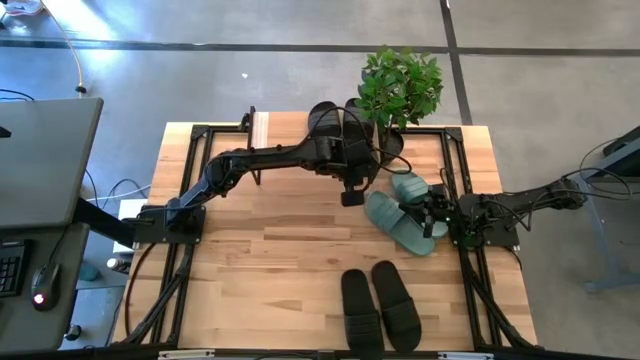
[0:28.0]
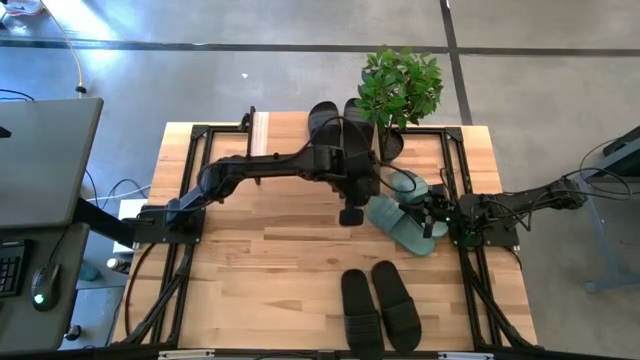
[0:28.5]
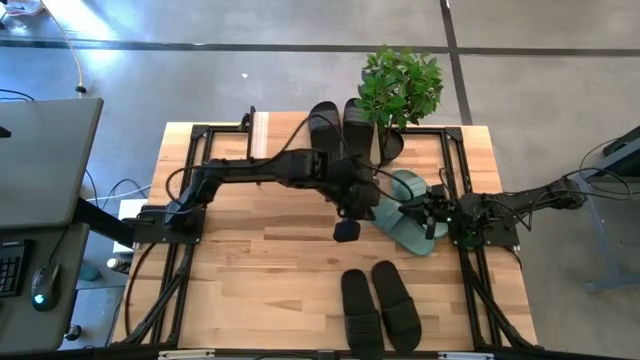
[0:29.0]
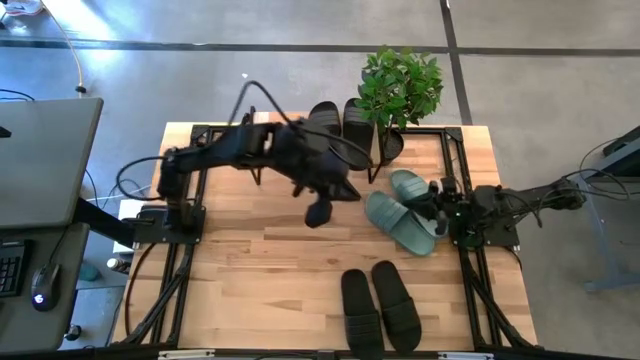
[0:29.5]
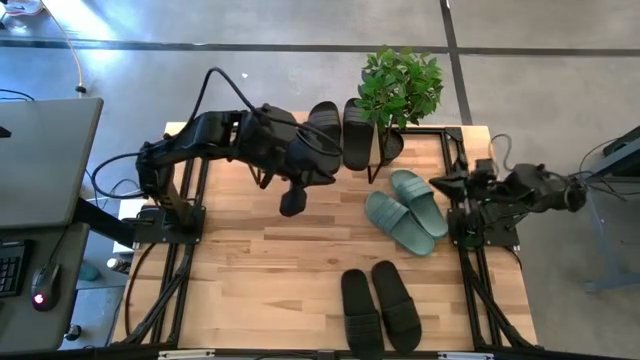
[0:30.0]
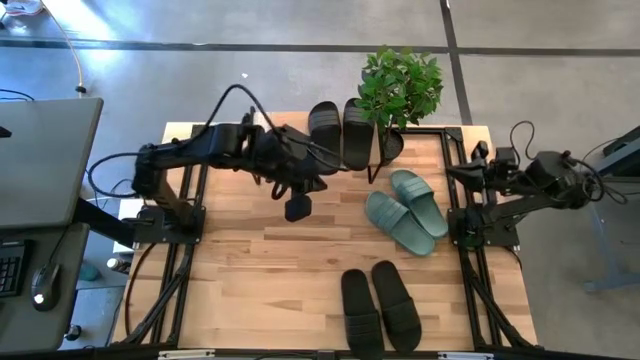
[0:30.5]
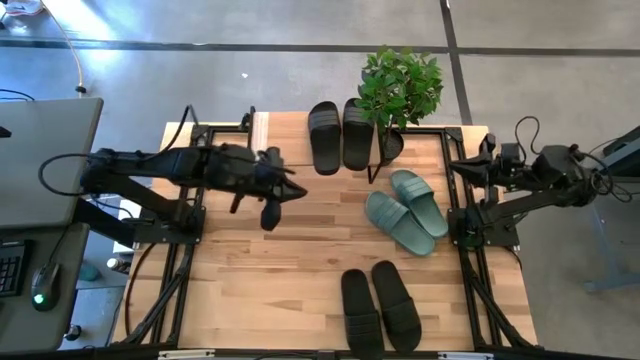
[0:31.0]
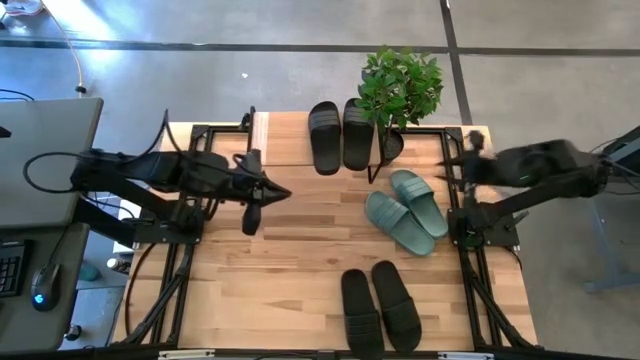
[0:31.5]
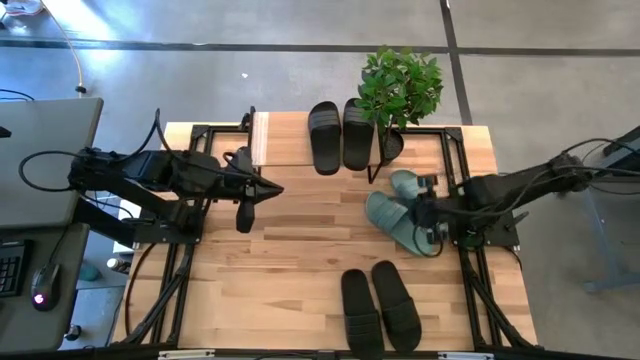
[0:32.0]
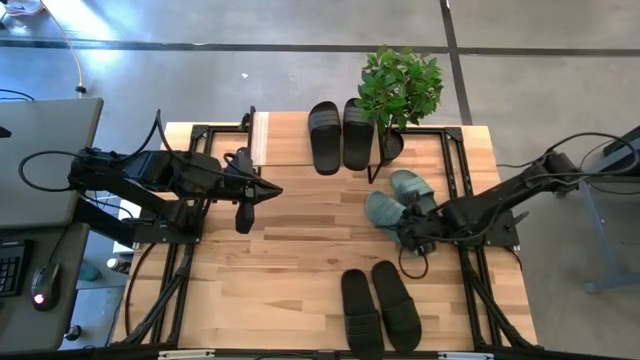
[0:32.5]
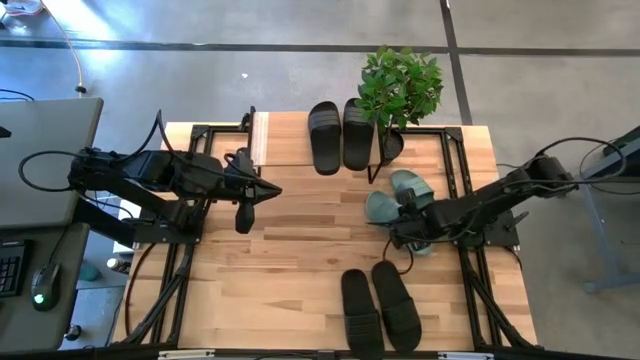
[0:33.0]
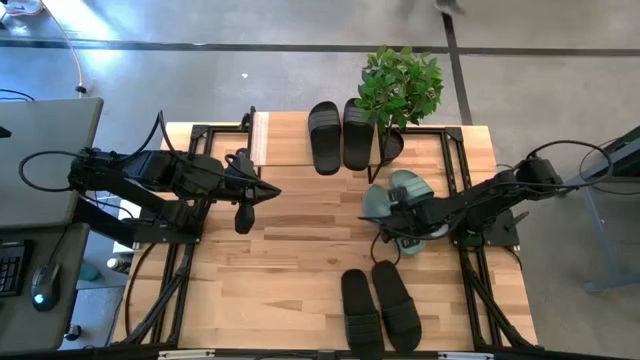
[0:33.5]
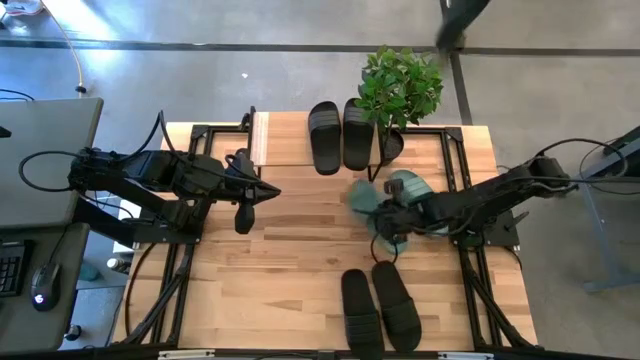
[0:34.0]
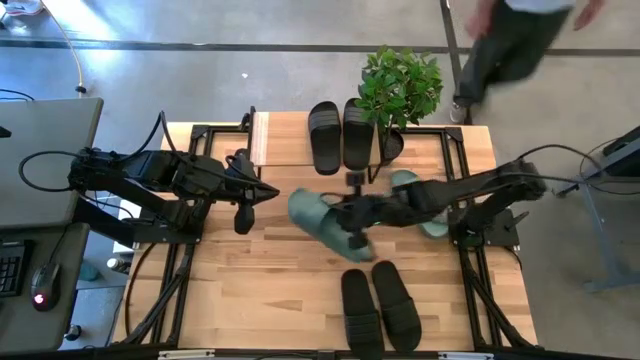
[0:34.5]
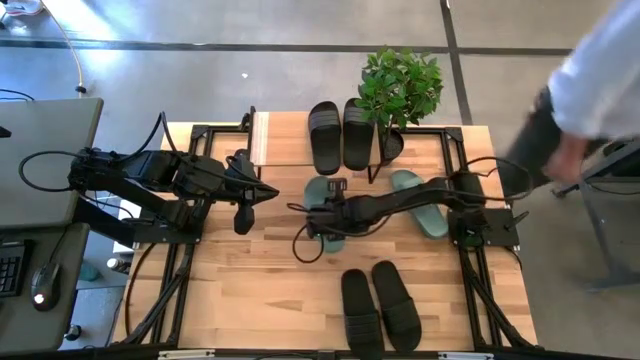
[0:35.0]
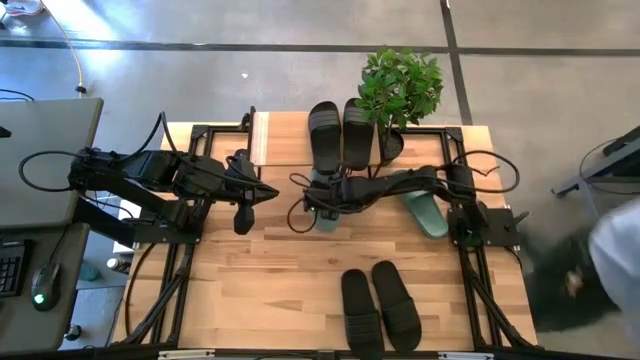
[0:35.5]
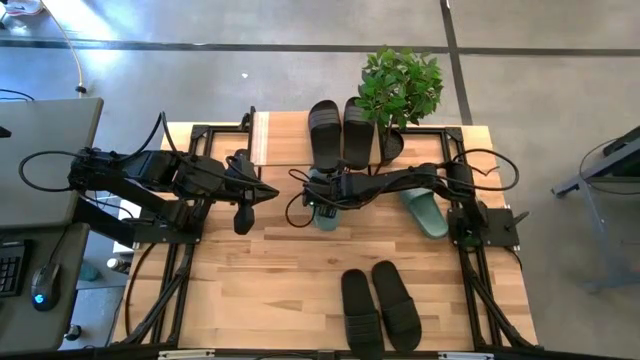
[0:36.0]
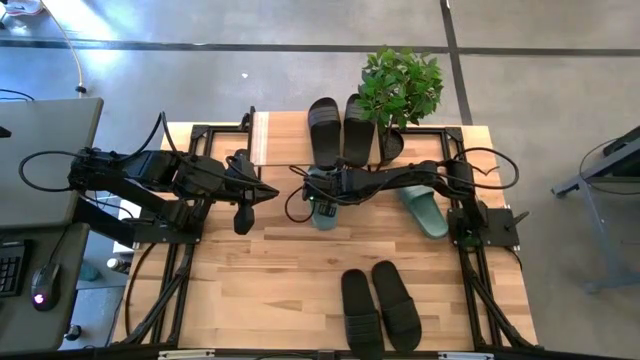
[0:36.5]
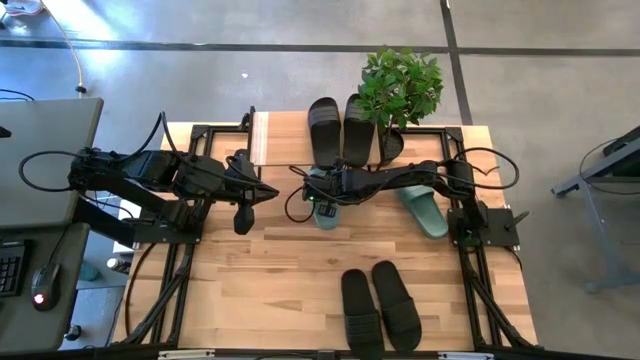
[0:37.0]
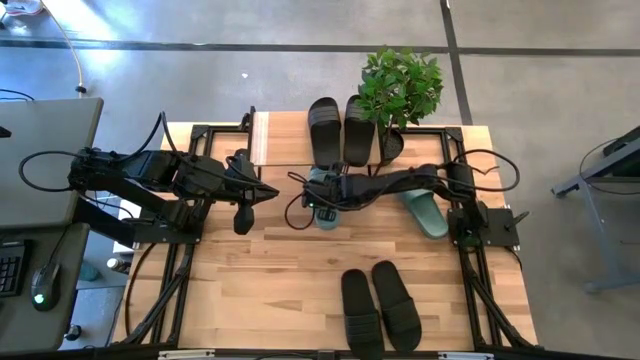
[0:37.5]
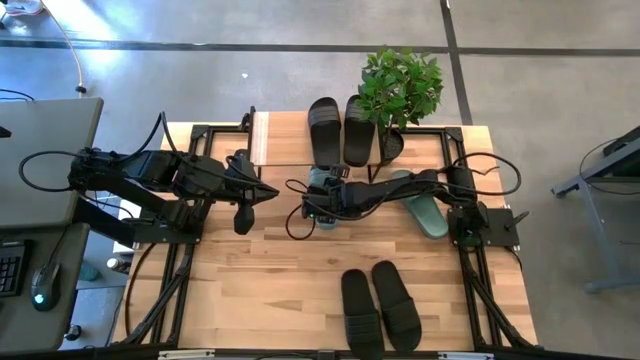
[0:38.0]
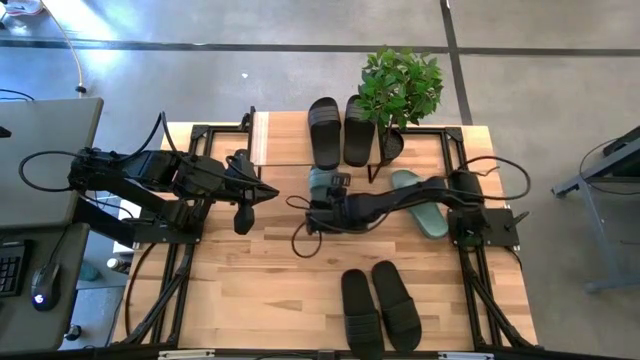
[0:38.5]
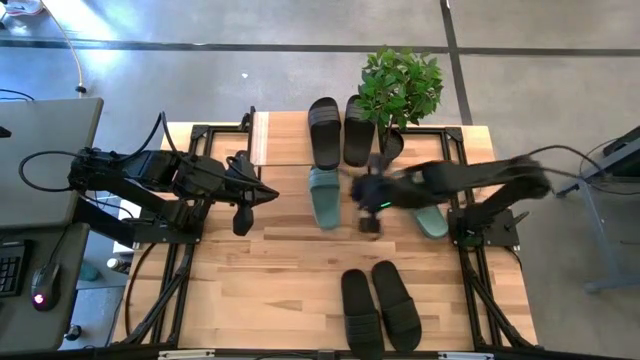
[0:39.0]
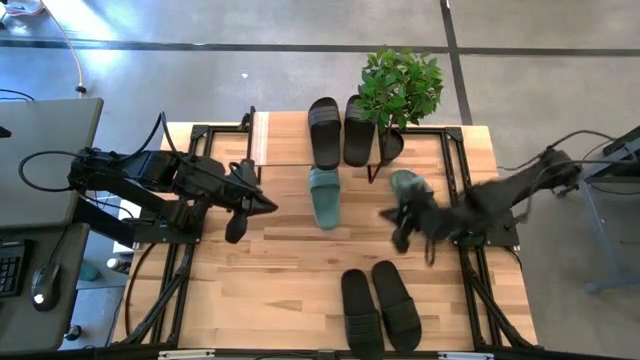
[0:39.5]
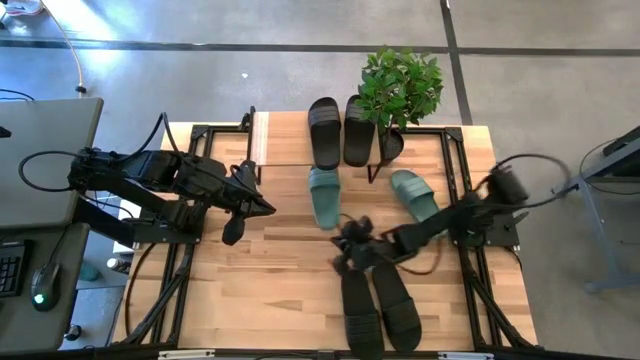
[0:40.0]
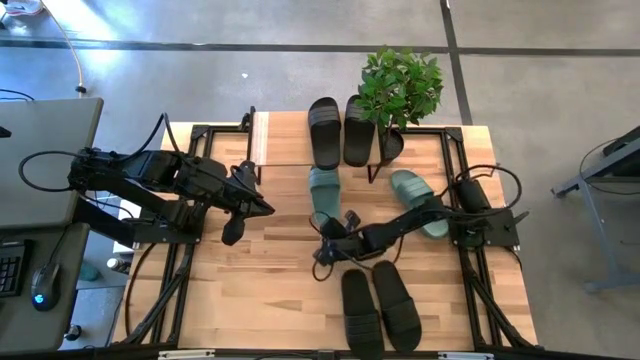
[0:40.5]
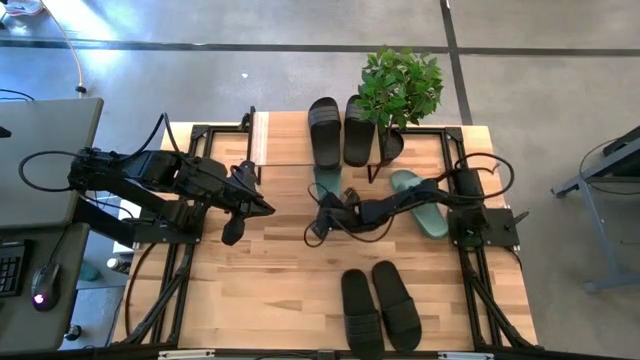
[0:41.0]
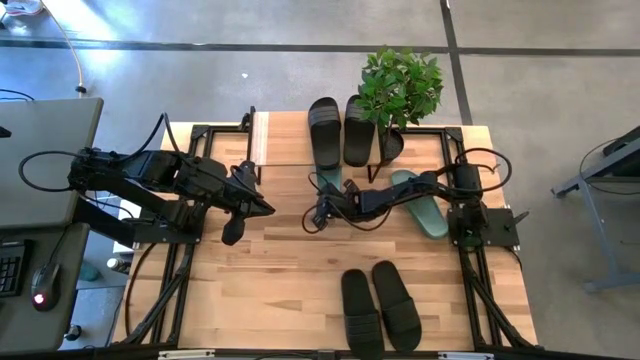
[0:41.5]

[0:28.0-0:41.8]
Task: Pick and place slides into the shelf
Put the green slipper under the shelf

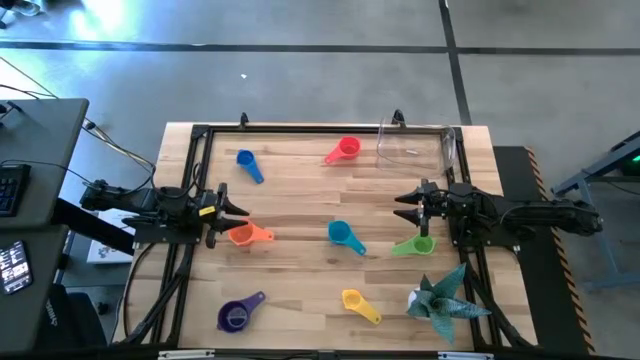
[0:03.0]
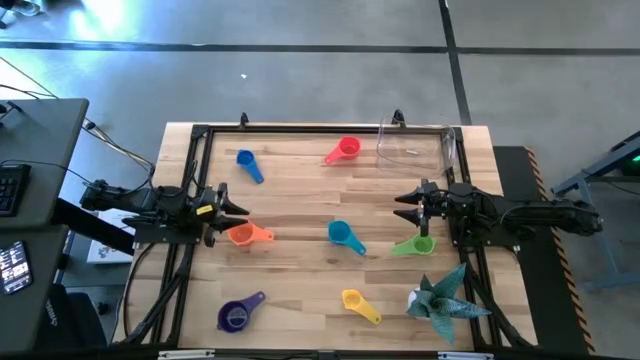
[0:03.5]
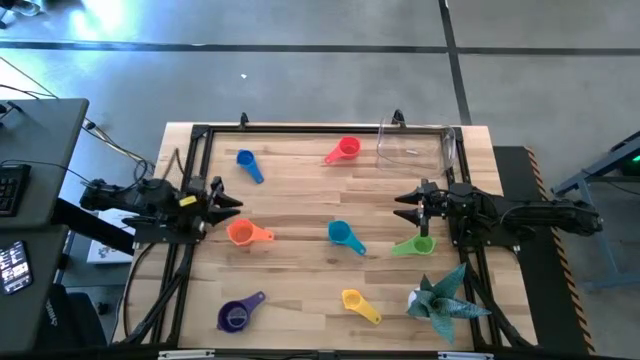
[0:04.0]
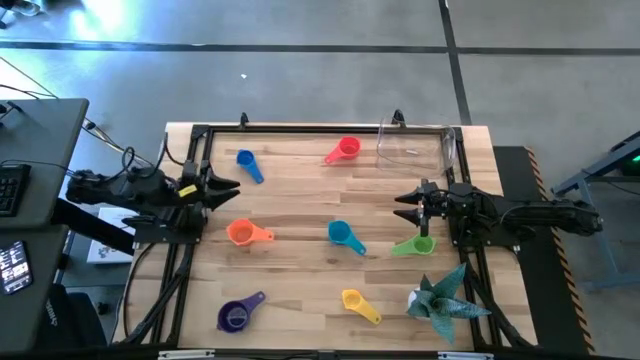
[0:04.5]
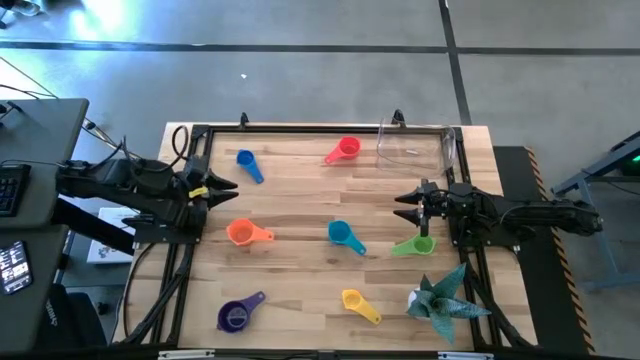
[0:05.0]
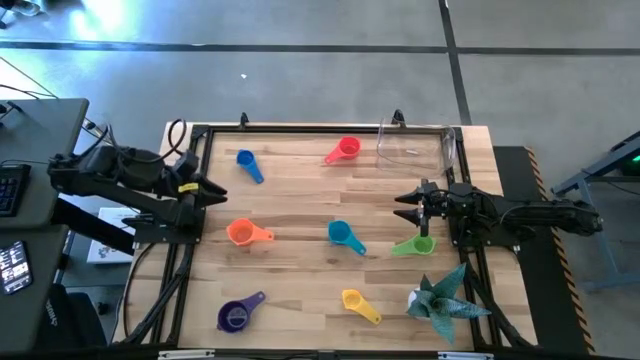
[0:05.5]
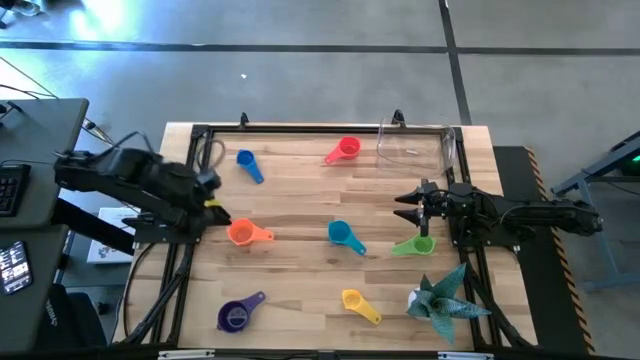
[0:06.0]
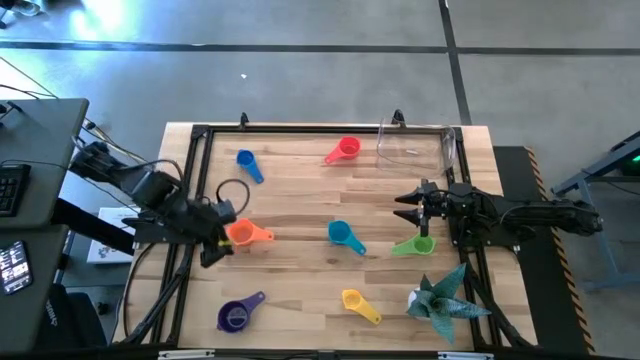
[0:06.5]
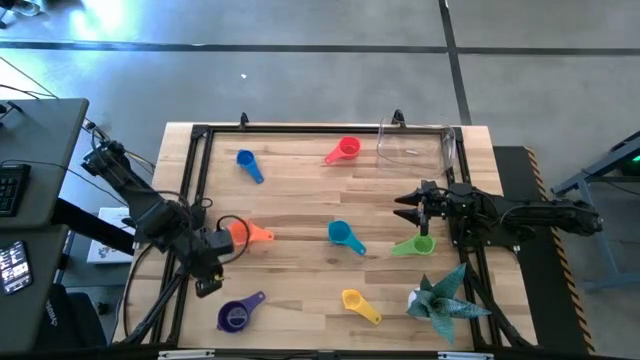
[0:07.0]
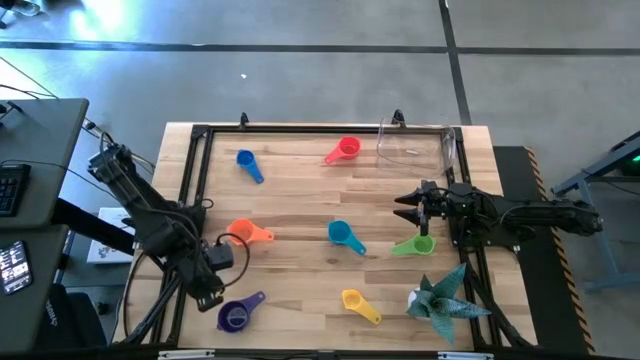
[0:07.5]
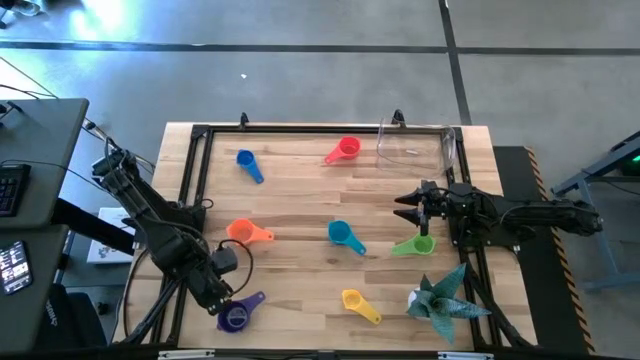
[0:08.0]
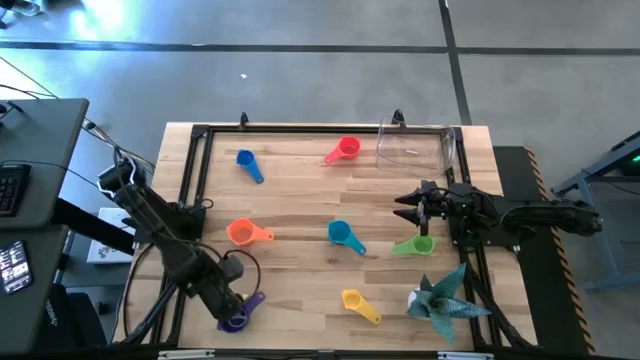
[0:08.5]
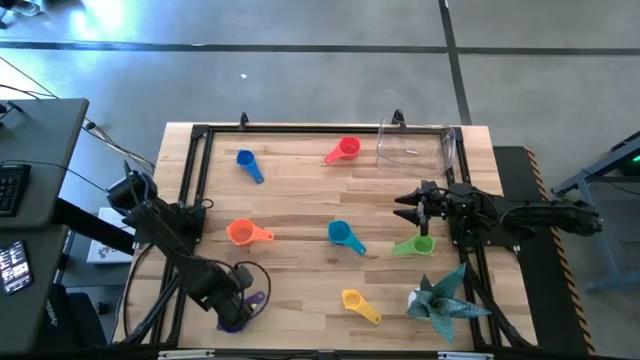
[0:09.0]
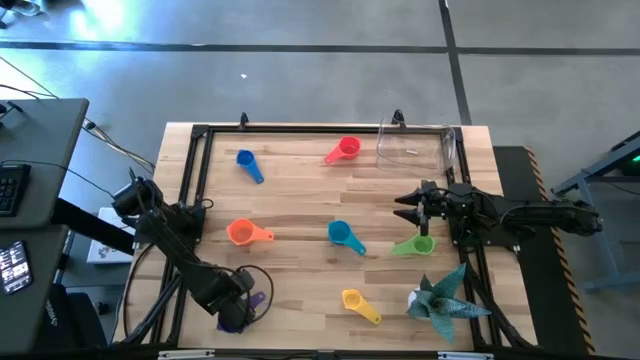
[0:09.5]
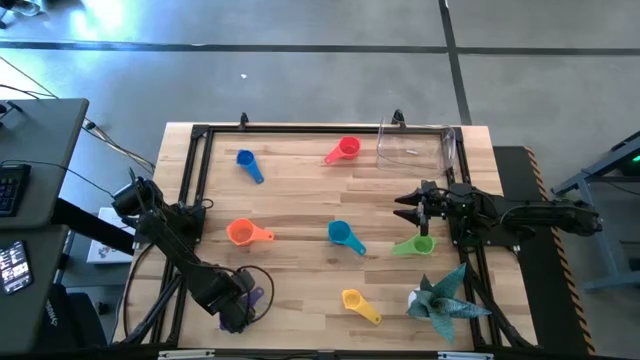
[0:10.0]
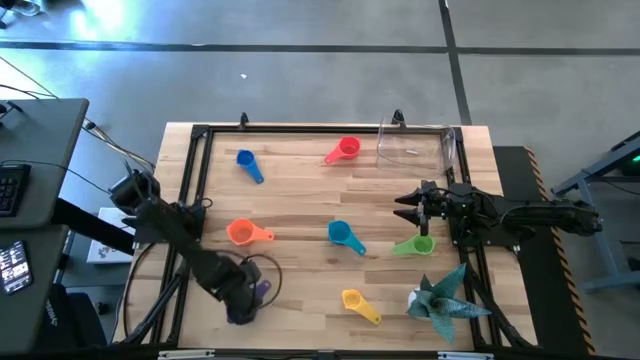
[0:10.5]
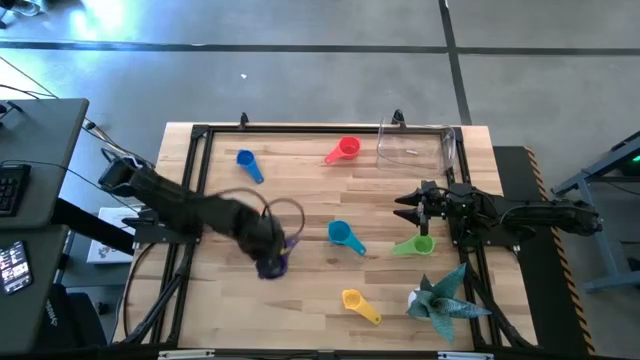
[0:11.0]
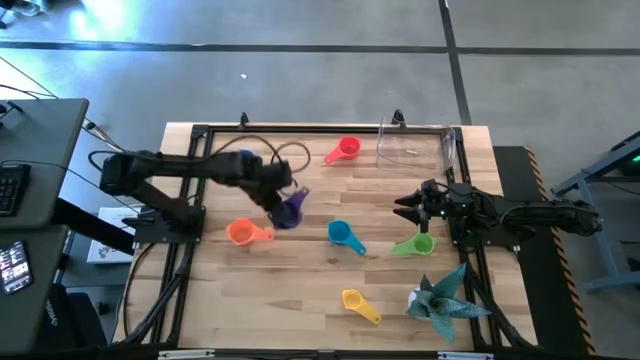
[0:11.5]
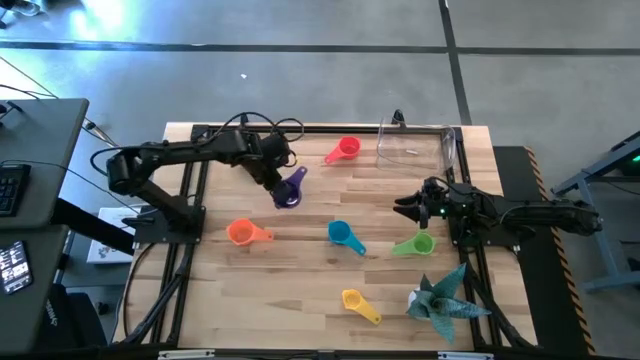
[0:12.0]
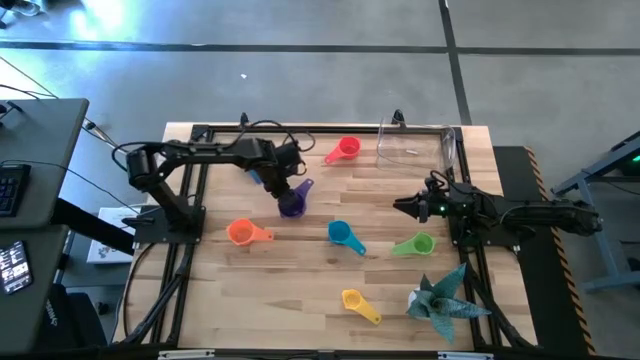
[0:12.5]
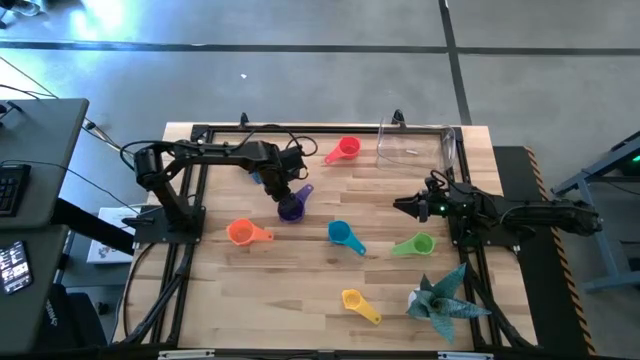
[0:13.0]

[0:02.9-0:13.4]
Task: Nest measuring cups in basket
Move the purple measuring cup to the top center of the table
